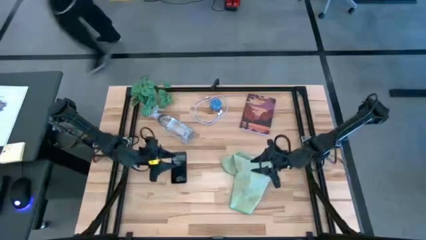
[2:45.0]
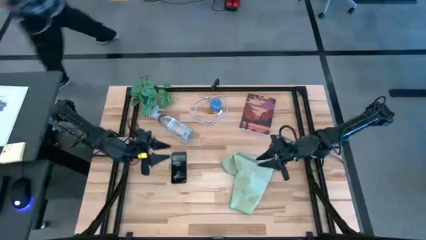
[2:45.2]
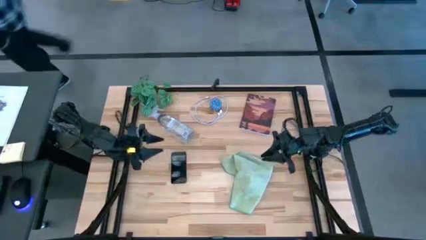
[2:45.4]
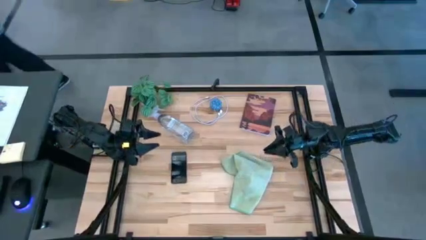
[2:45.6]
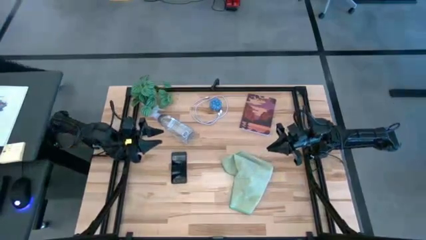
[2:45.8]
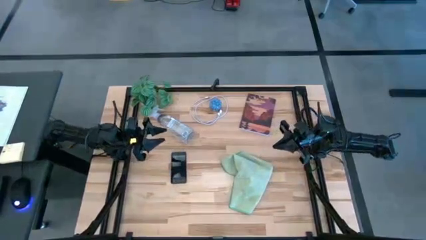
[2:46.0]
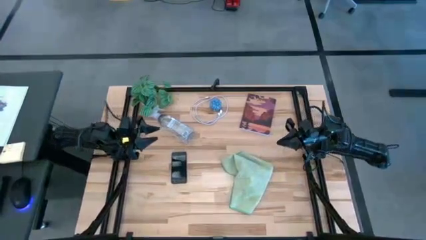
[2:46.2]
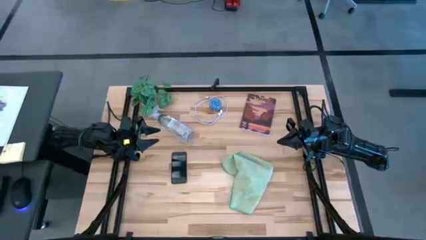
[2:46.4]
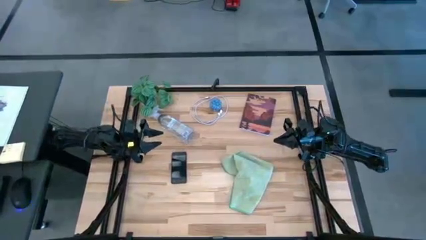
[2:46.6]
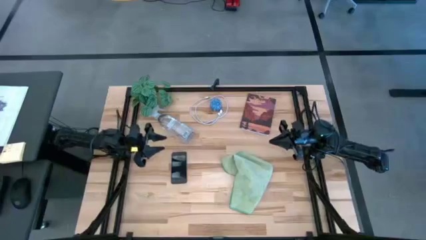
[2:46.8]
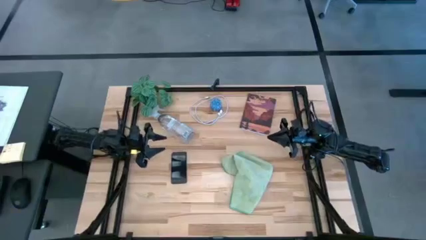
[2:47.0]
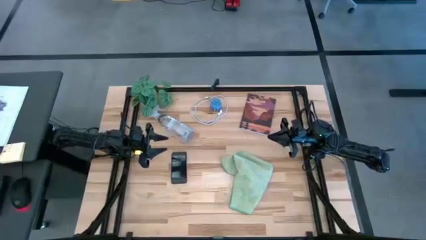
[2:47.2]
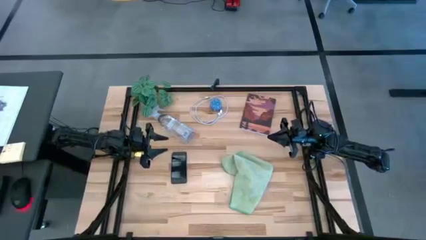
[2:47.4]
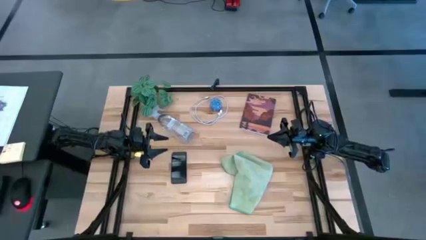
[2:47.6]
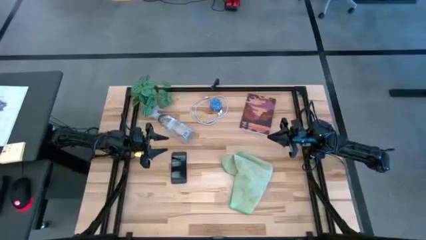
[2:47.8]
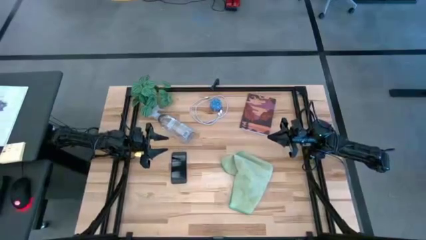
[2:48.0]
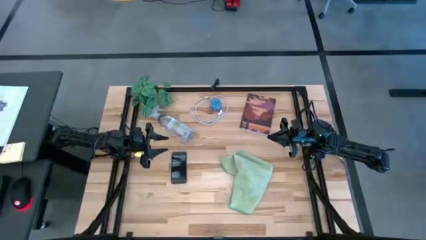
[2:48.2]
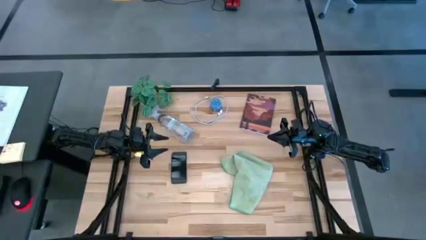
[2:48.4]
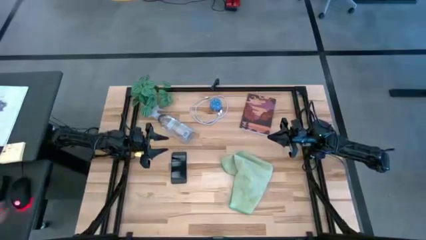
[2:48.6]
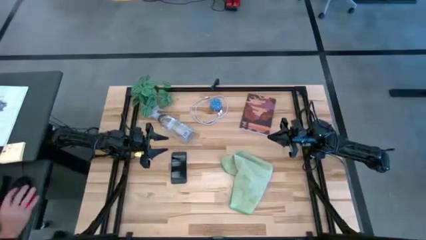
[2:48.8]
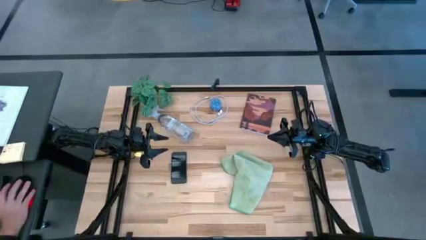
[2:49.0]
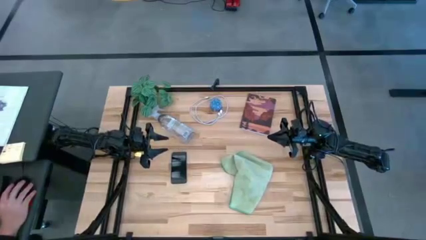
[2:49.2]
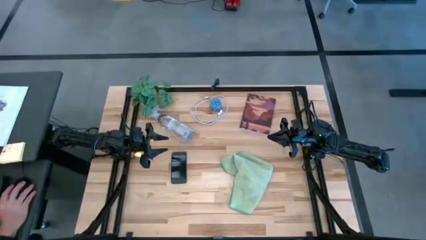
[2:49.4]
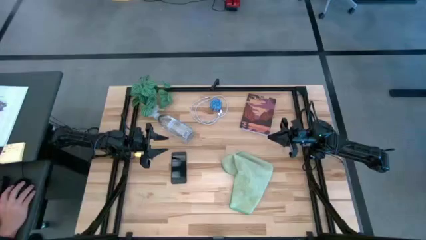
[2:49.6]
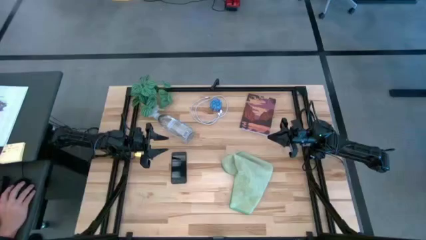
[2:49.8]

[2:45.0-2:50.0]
Task: Apply microfiber cloth
Return to Home Position

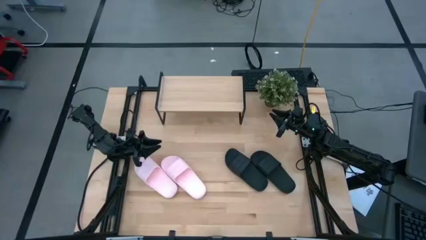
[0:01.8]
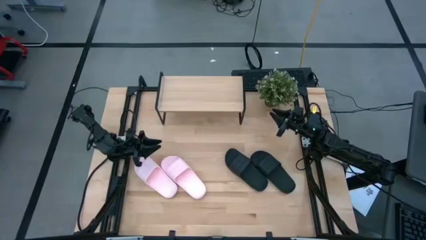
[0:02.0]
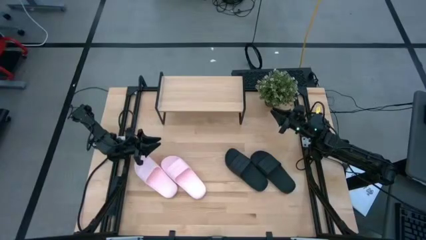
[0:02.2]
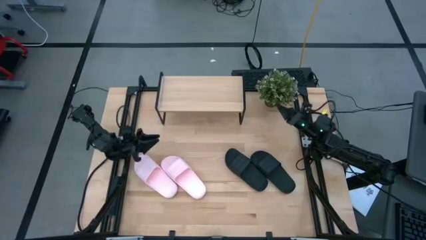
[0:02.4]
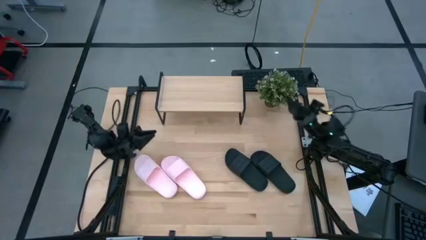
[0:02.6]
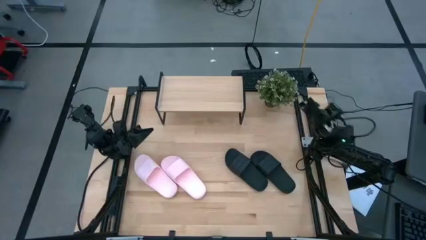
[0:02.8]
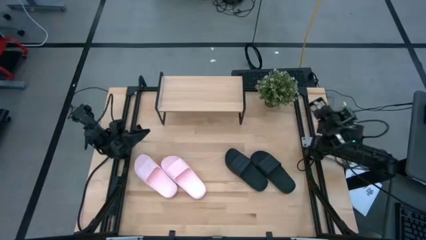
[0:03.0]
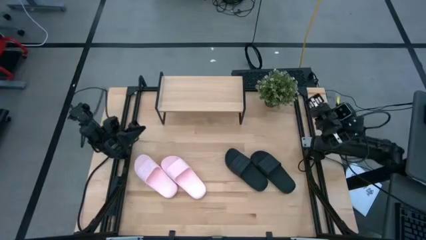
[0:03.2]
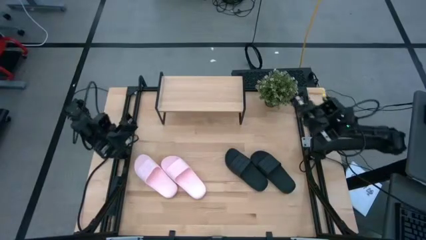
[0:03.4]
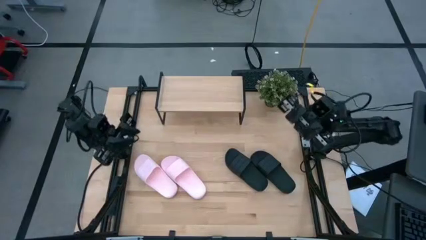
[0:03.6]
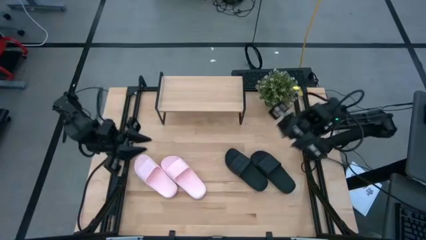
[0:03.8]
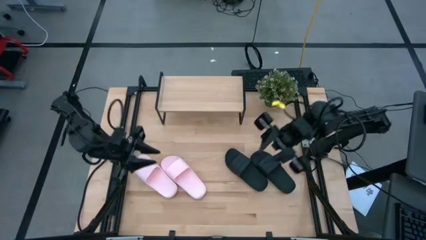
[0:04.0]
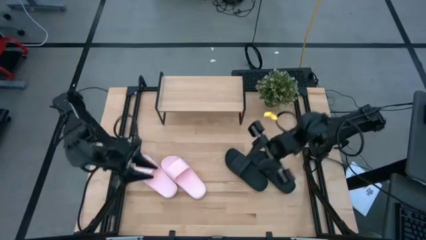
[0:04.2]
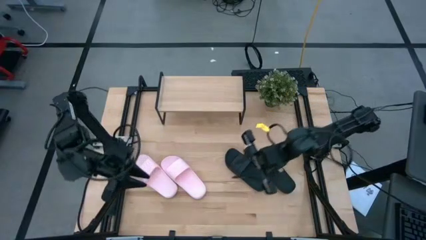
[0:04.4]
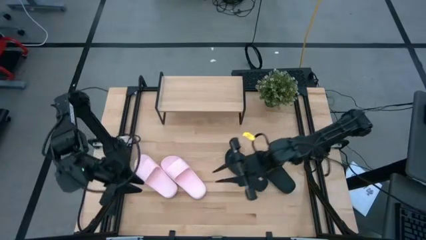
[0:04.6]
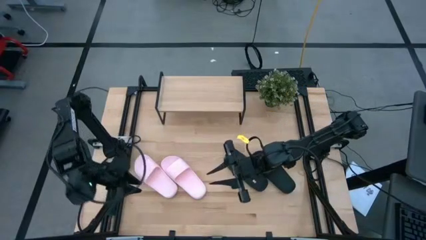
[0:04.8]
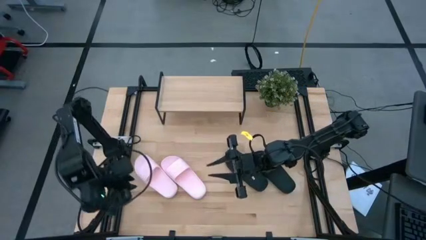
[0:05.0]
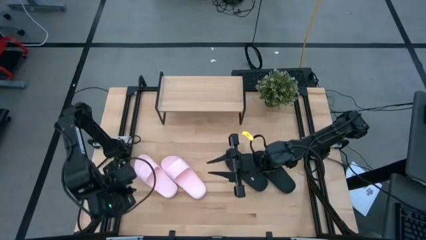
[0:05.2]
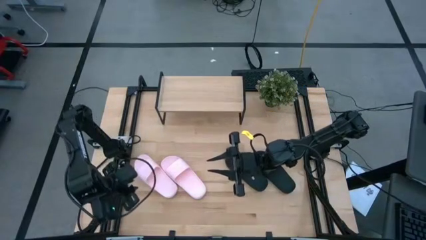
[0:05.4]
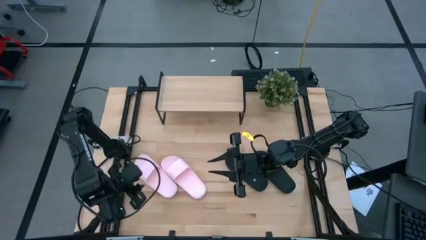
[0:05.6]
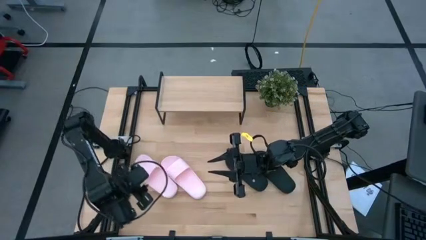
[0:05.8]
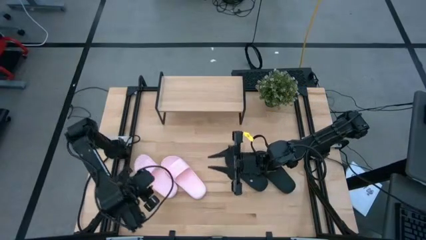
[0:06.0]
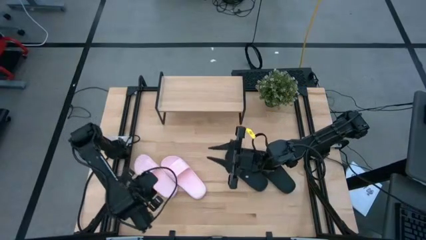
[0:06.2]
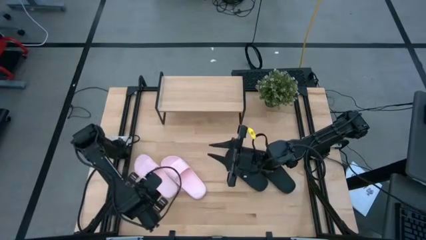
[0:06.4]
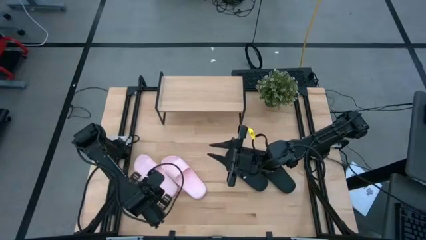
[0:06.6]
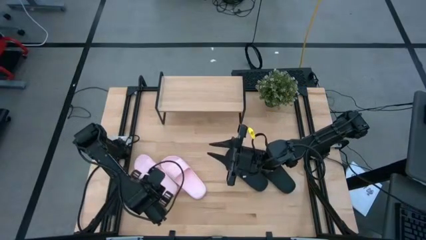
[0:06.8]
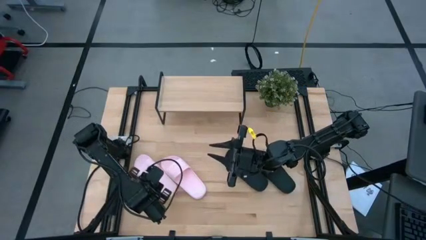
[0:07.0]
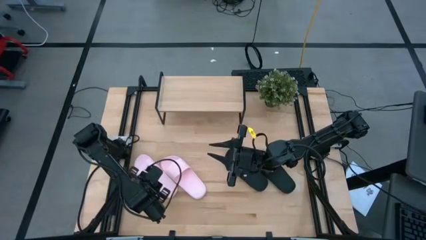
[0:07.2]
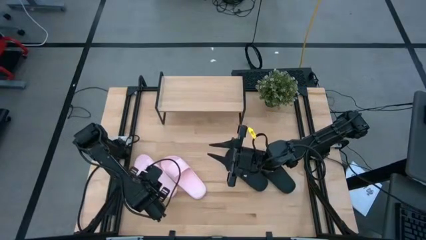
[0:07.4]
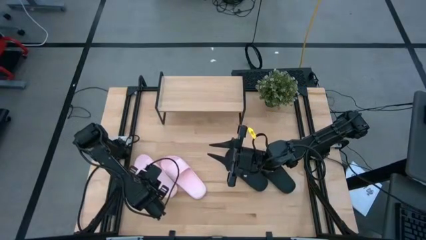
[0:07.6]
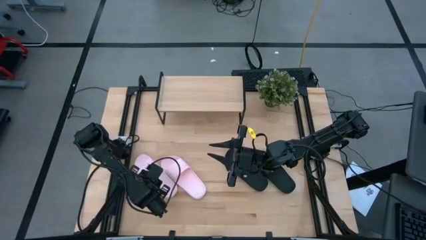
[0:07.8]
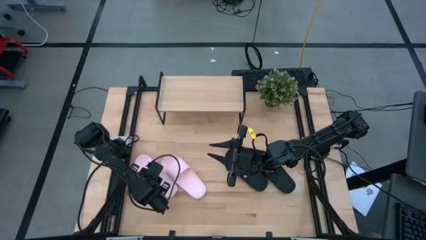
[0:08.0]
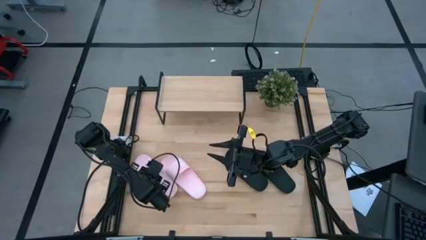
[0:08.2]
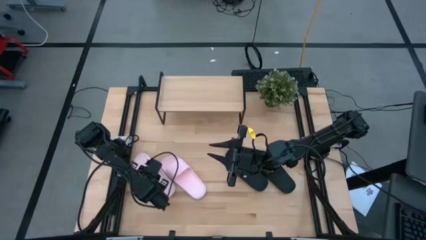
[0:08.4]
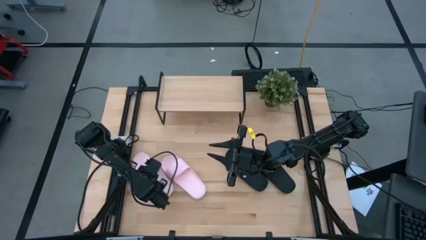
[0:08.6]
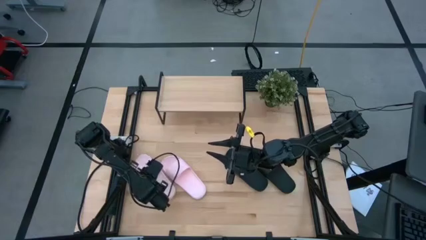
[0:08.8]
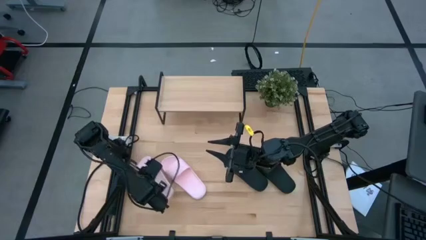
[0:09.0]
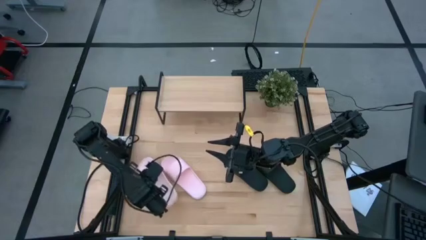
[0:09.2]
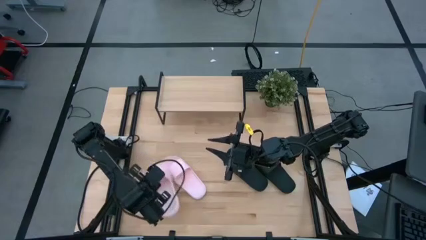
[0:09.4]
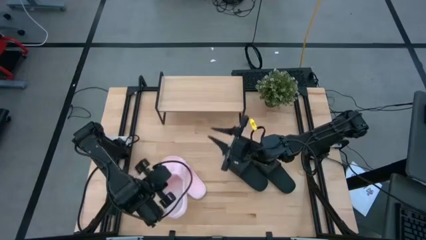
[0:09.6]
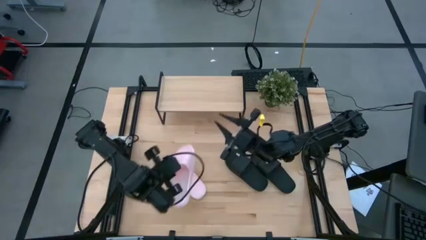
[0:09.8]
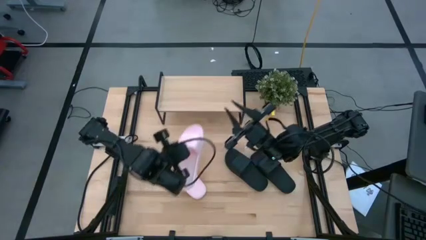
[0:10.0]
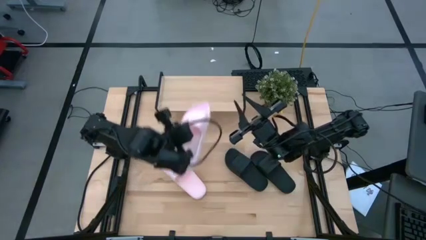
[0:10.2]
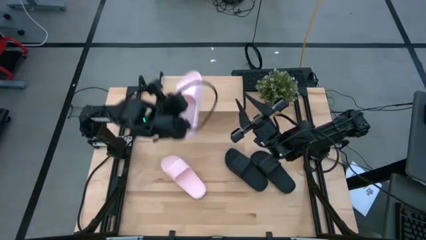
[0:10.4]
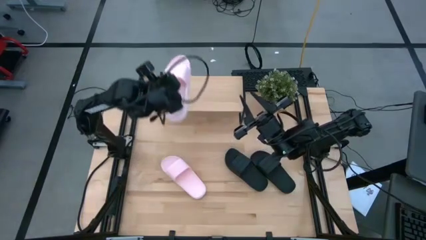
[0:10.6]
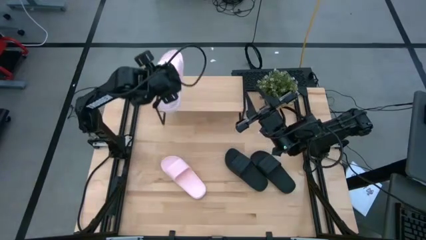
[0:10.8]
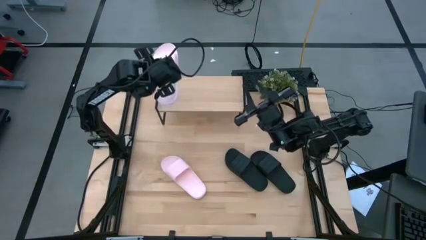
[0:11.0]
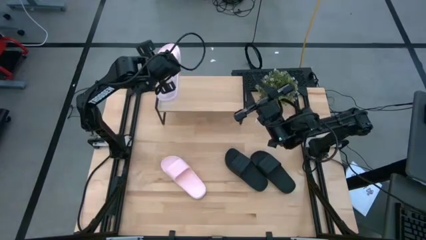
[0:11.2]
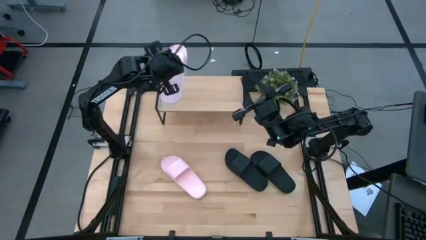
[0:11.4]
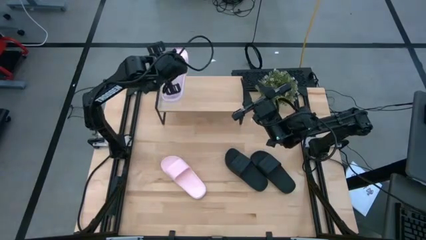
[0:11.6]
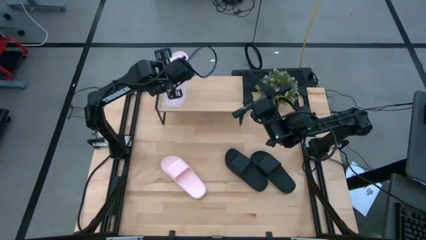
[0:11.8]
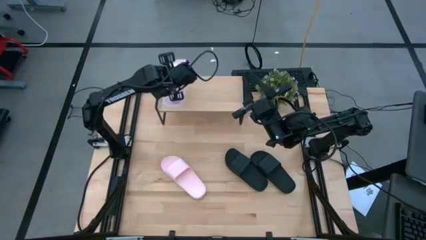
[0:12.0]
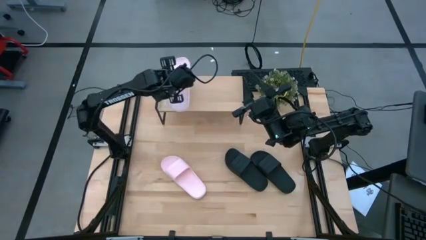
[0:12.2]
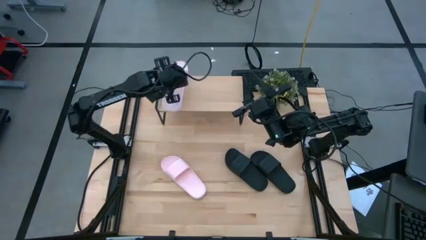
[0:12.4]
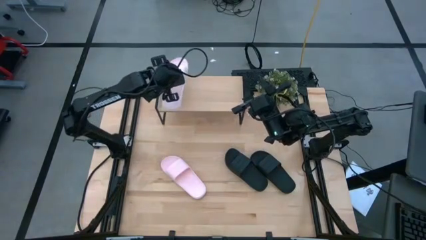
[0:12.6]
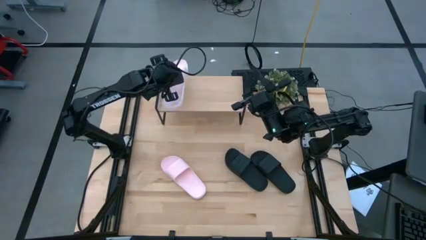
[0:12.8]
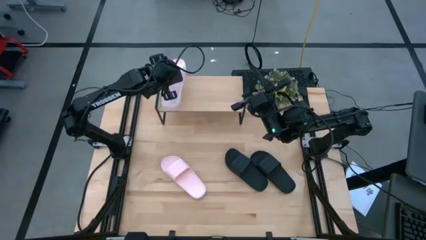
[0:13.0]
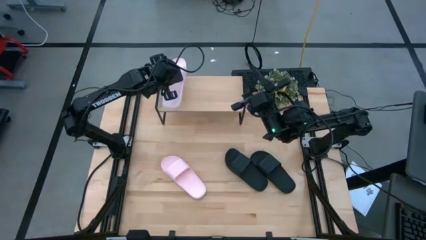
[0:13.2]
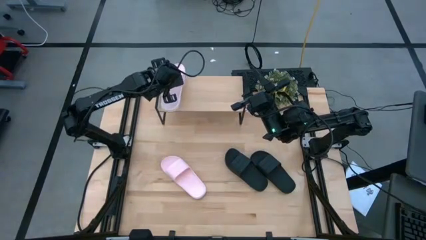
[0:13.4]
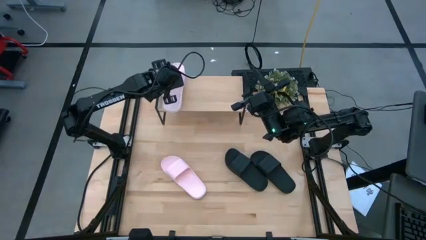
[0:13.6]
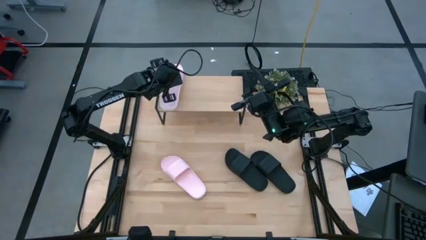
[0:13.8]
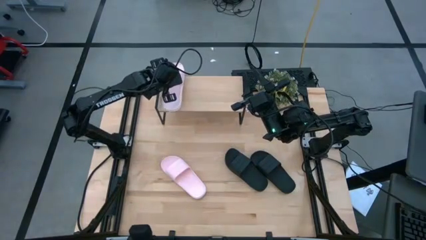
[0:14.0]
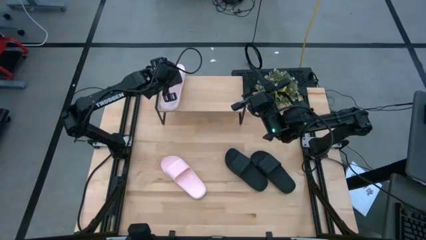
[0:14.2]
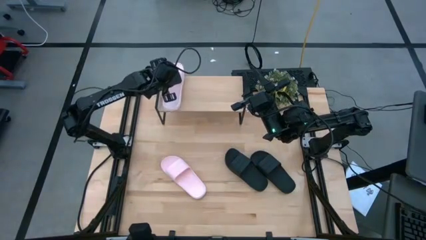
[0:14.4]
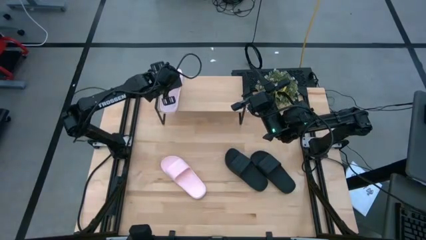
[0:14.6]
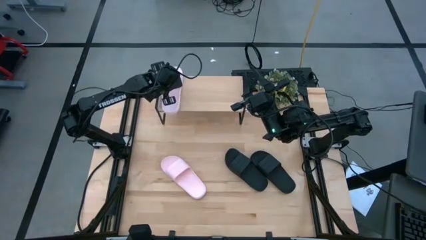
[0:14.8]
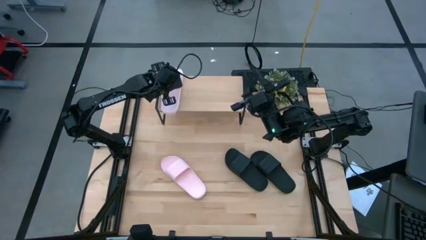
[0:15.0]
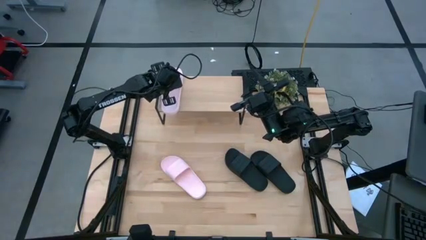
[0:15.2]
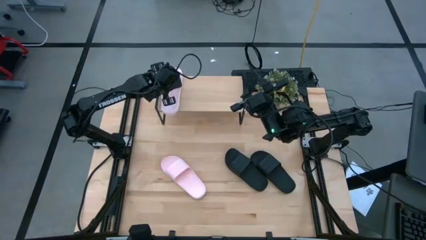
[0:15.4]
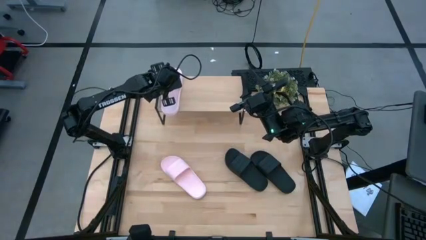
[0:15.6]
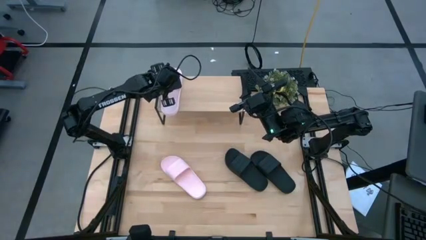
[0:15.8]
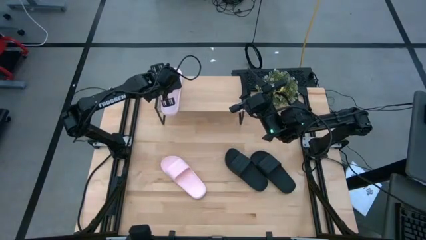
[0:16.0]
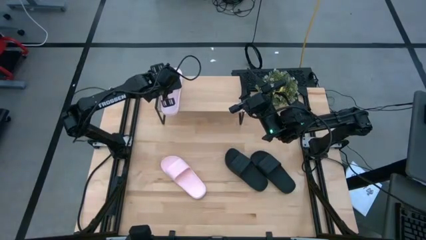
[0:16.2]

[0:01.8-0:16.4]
Task: Pick and place slides into the shelf
Put the left pink slide on the shelf
